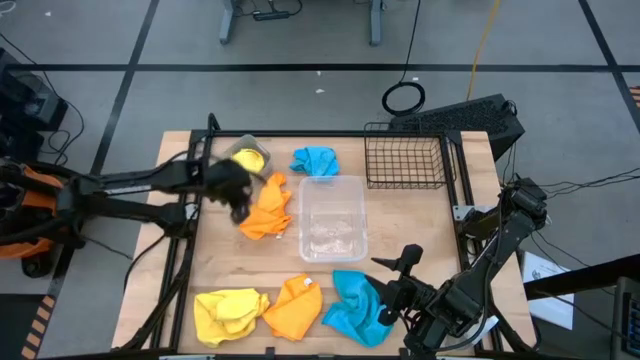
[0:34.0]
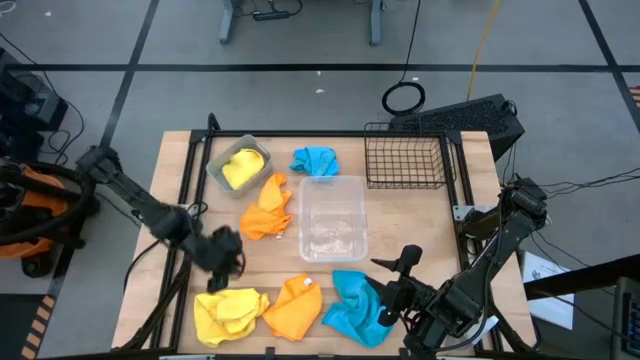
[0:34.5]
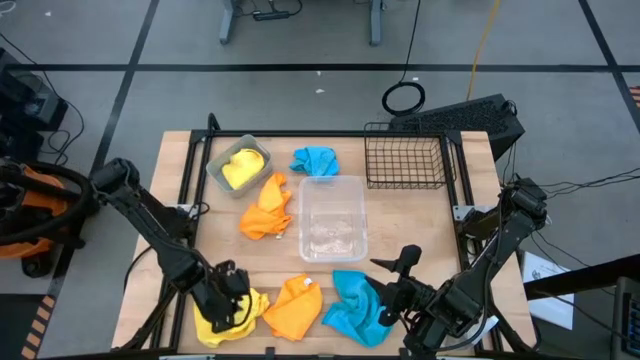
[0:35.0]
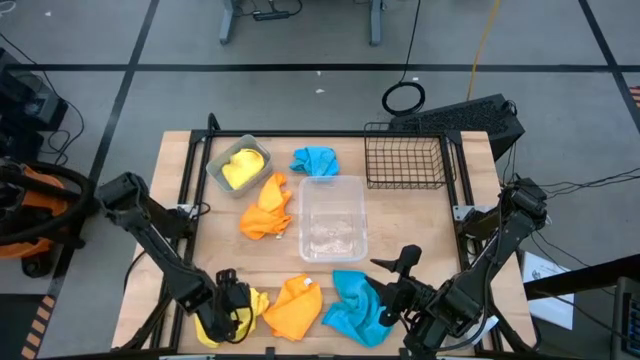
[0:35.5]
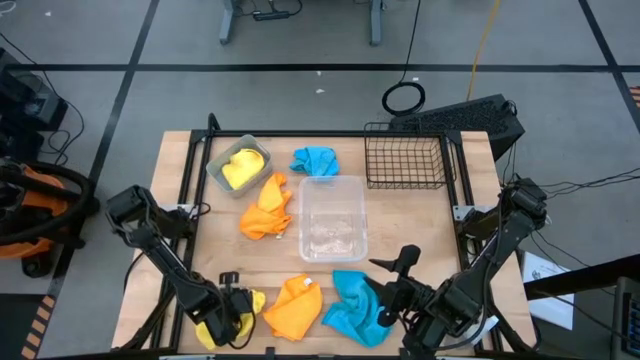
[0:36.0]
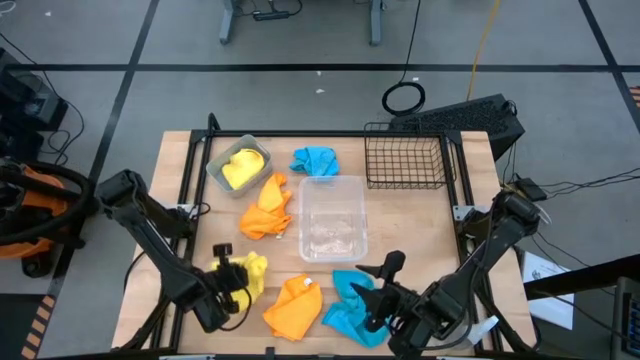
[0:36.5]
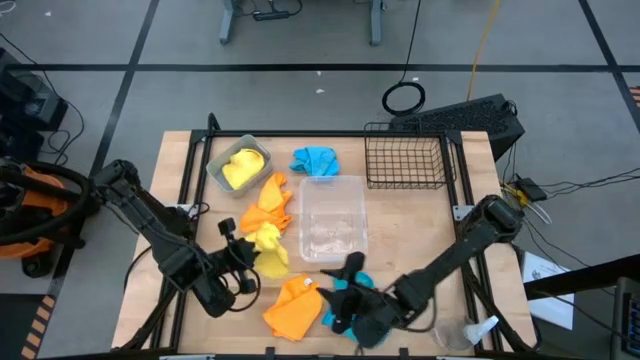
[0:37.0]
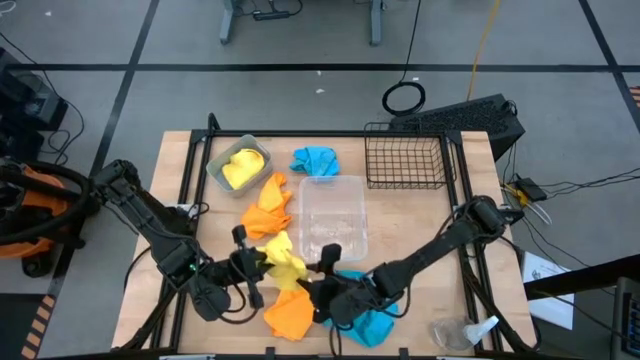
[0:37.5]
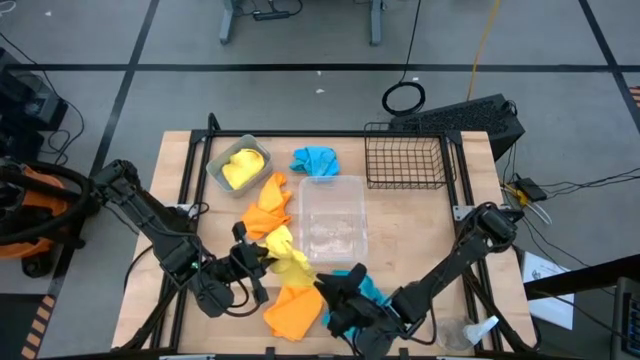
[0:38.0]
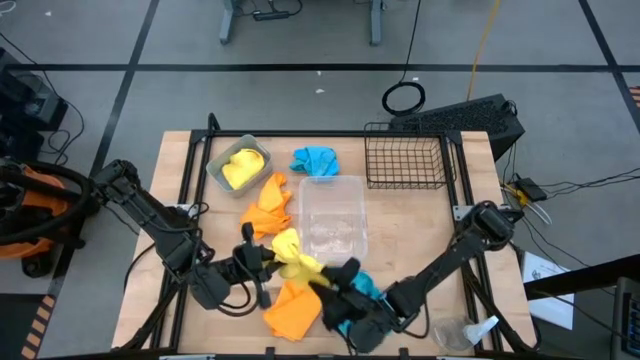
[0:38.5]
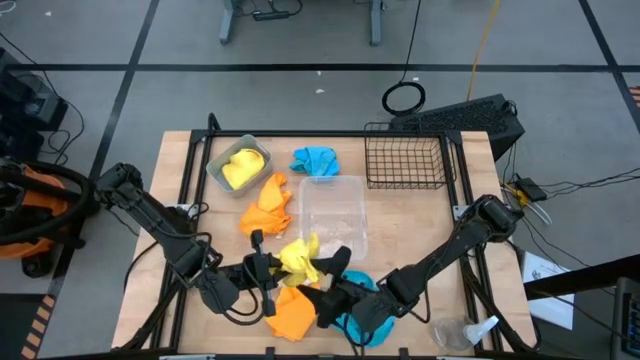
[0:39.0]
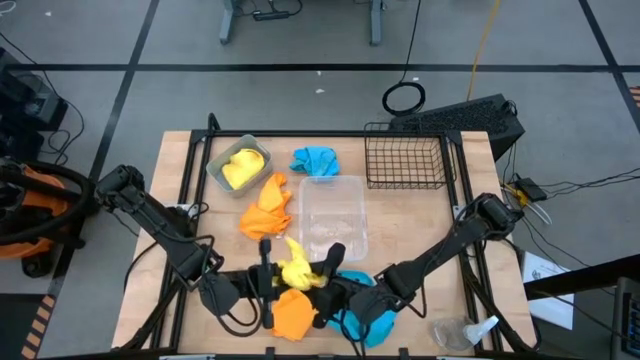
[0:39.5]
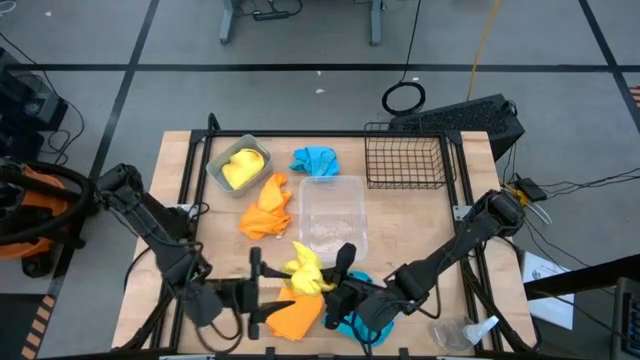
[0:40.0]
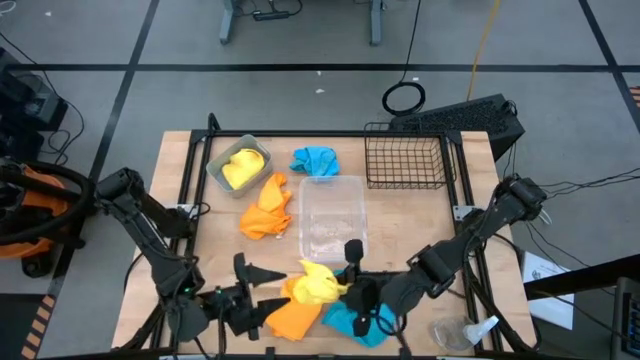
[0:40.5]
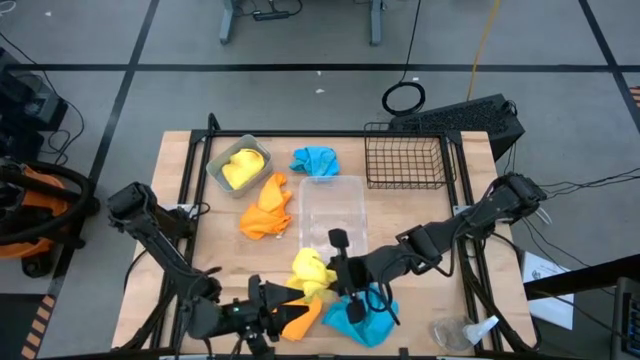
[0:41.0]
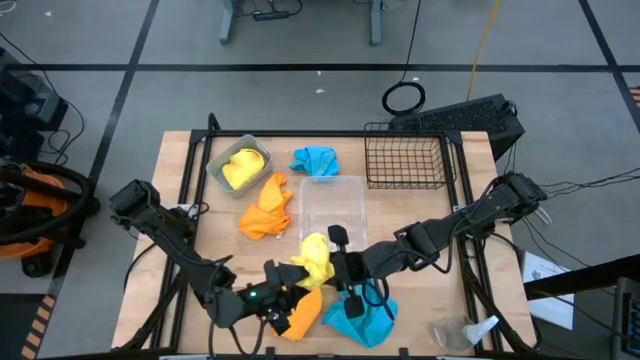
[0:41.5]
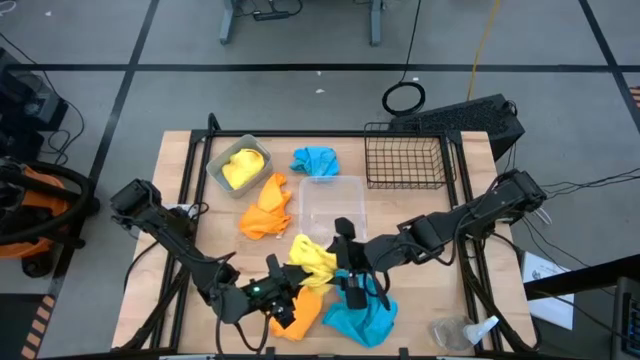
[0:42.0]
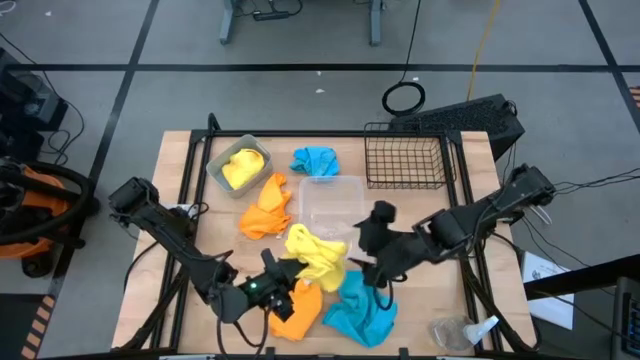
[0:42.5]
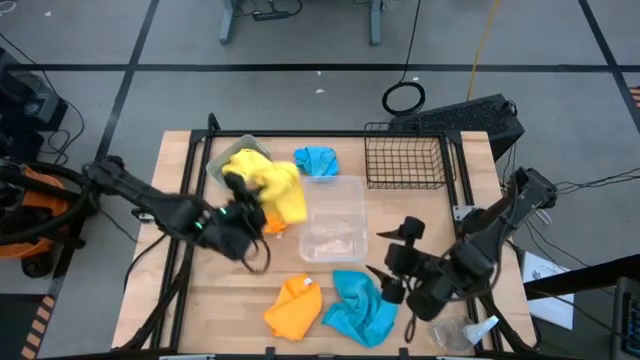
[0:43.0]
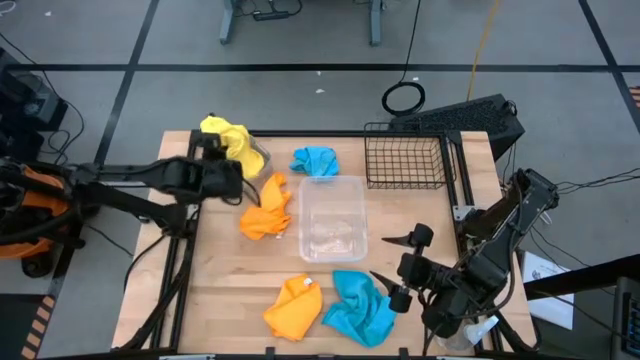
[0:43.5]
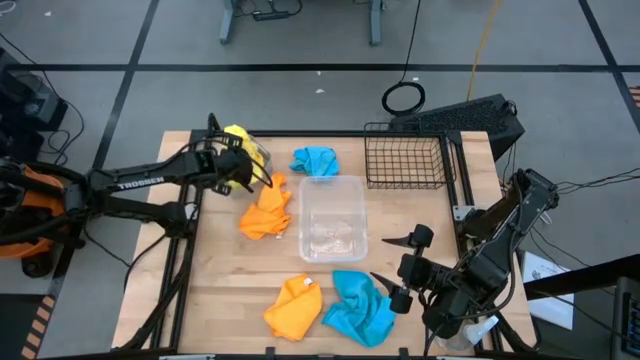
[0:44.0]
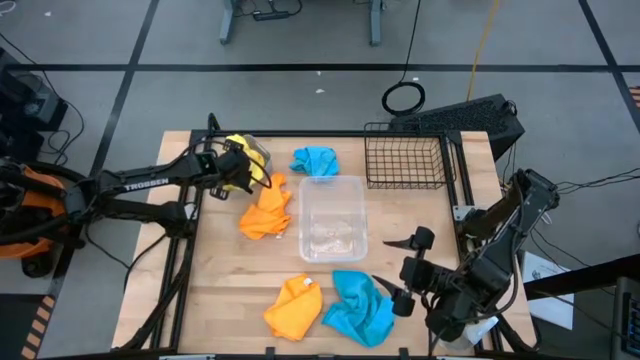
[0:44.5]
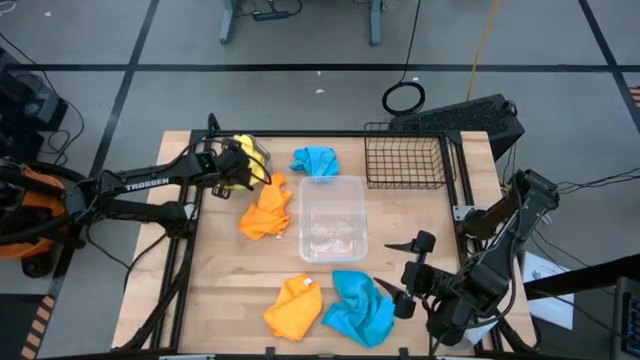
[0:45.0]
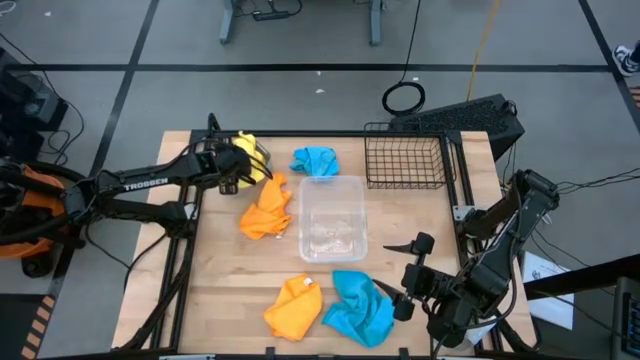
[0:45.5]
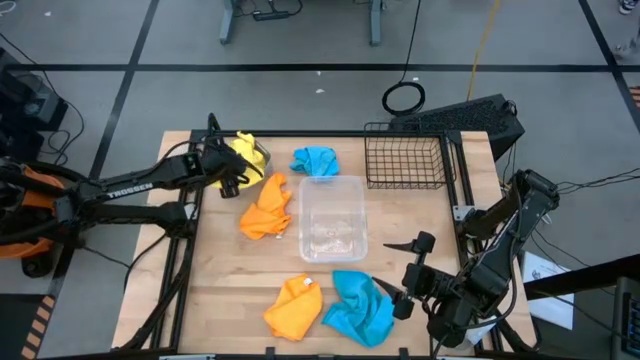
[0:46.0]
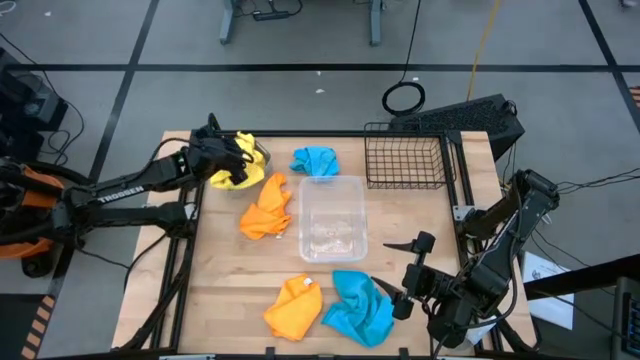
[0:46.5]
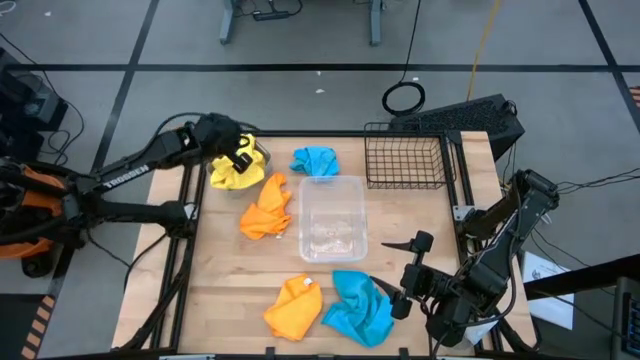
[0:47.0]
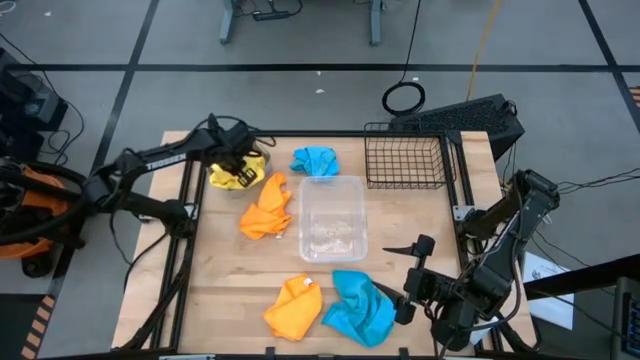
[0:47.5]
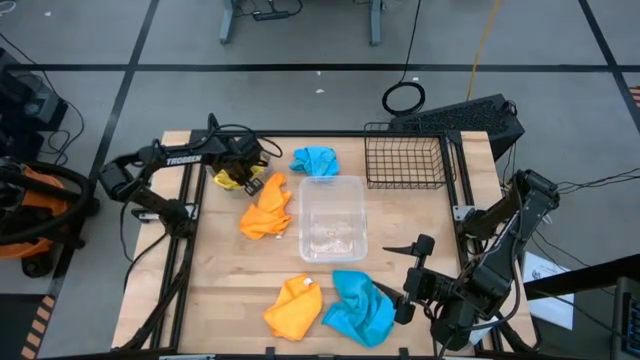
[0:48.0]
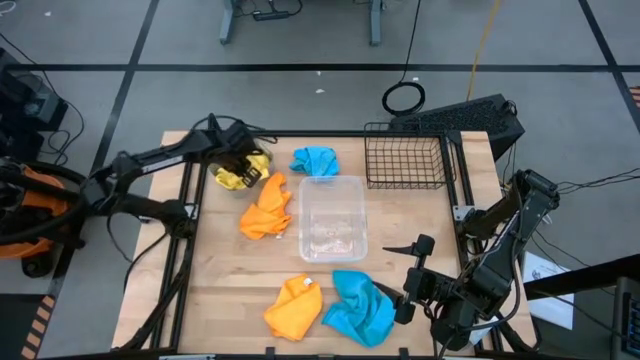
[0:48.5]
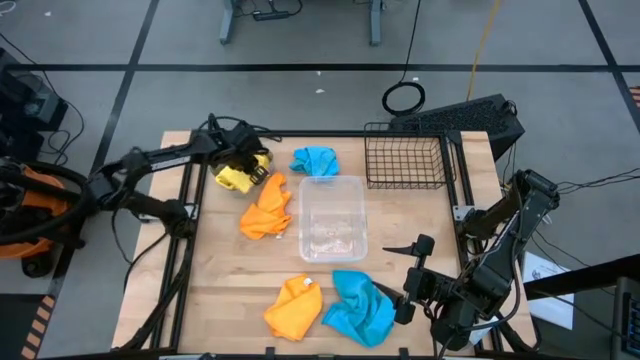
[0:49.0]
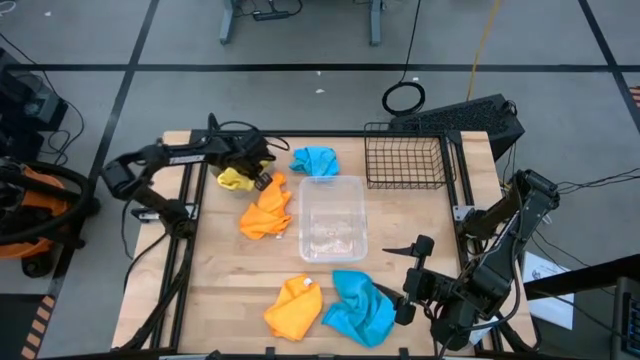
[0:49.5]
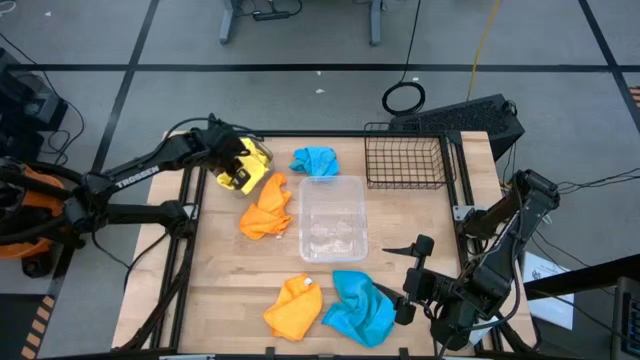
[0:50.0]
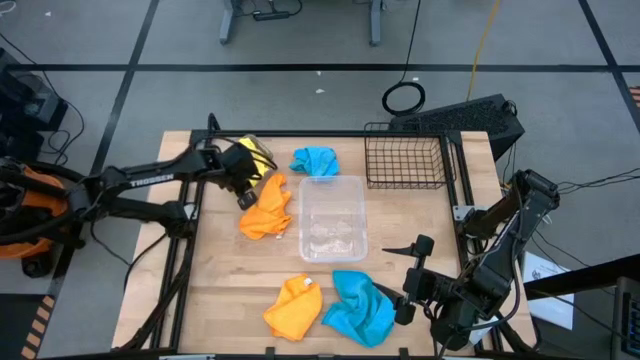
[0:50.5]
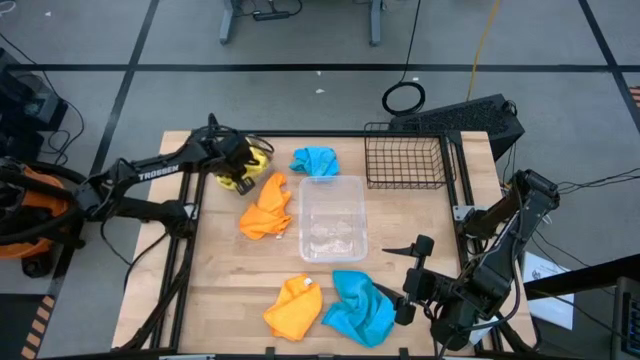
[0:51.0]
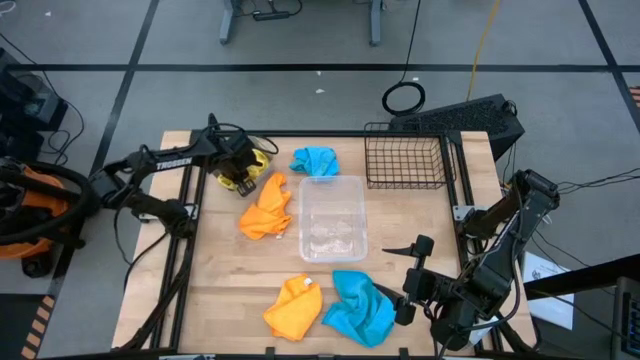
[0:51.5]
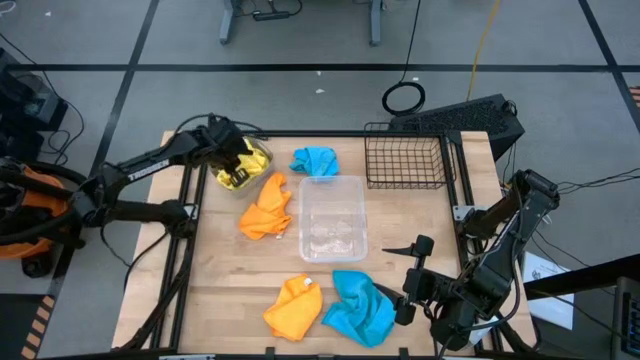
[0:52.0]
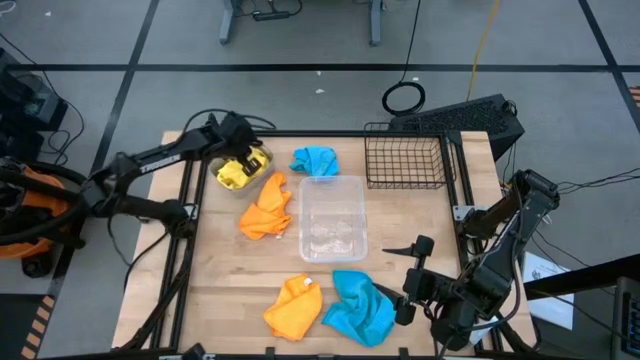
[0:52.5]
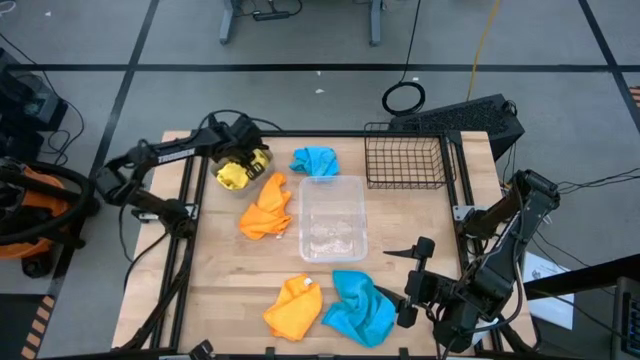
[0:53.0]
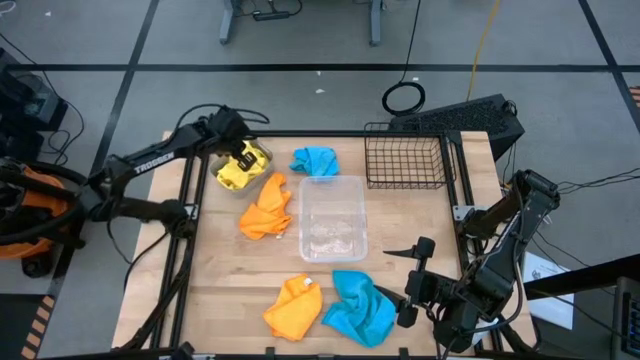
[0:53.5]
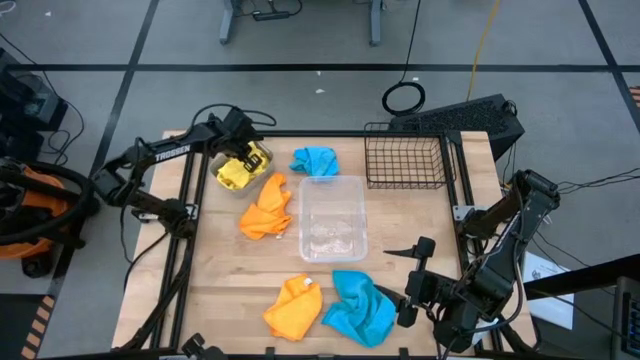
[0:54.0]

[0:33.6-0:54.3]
Task: Sort microfiber towel by color & place in baskets
Put the yellow towel into the gray bin

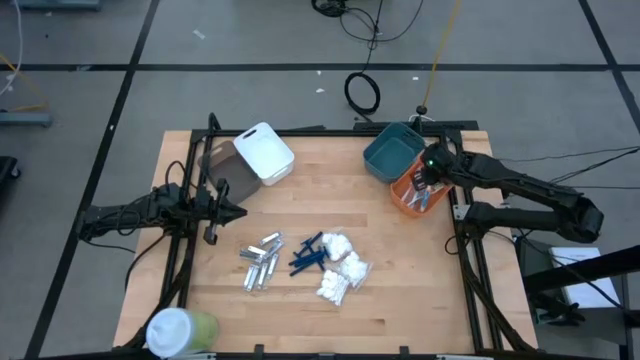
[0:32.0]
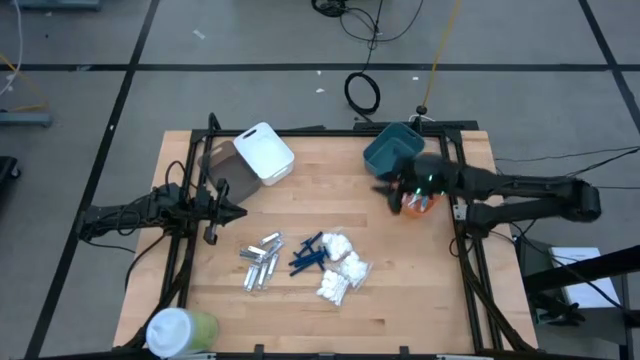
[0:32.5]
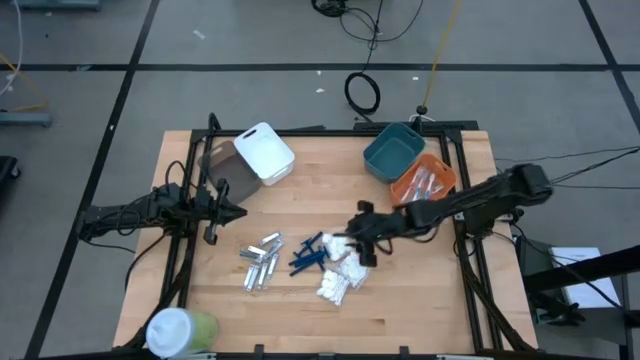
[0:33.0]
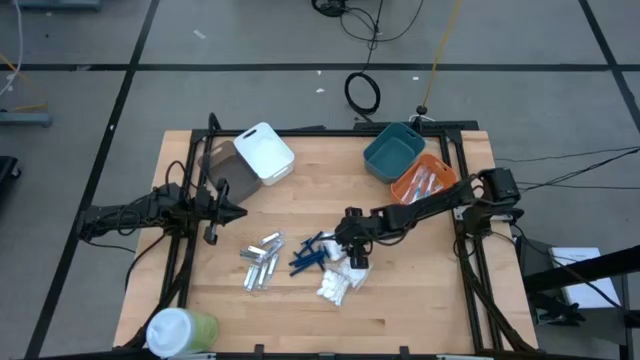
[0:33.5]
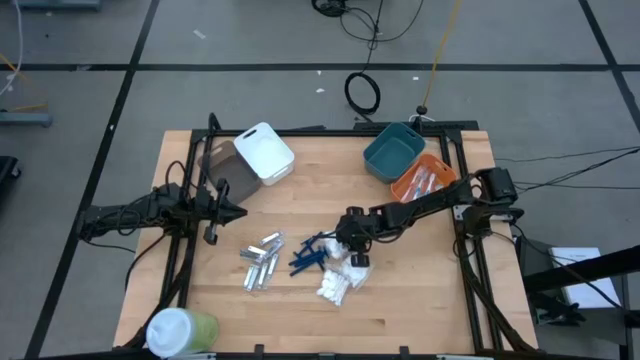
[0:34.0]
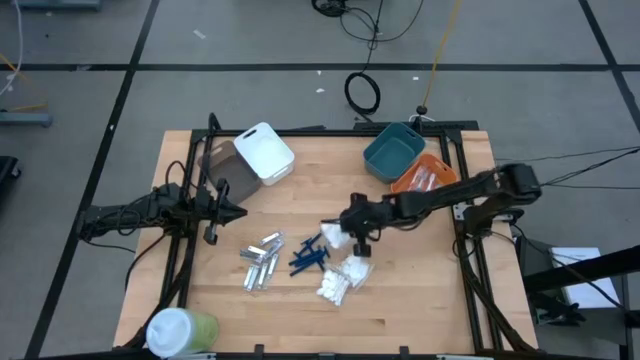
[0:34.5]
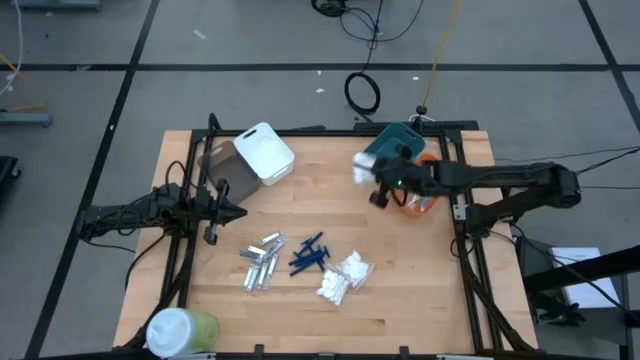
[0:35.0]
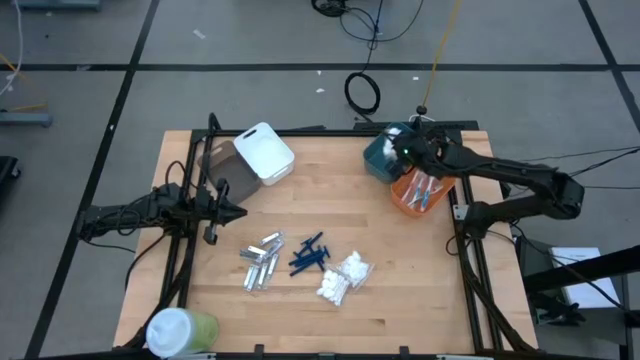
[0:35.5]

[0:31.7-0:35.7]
Task: Pick & Place Travel size toiletries
Put the top cotton pack into the green bin
